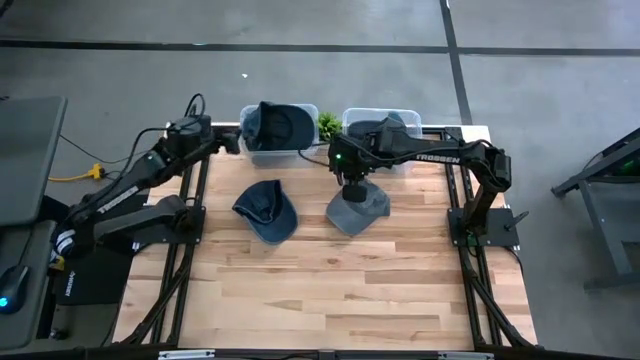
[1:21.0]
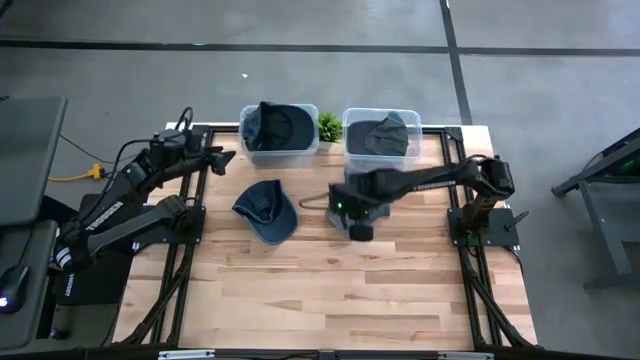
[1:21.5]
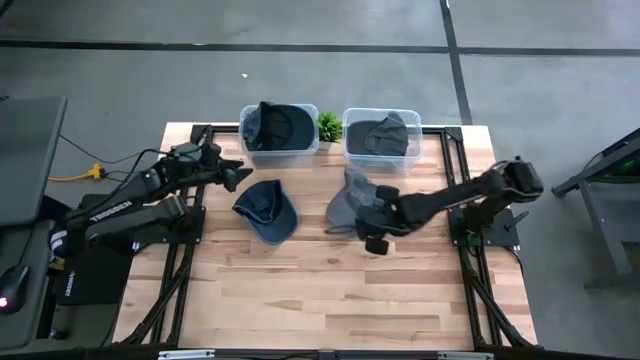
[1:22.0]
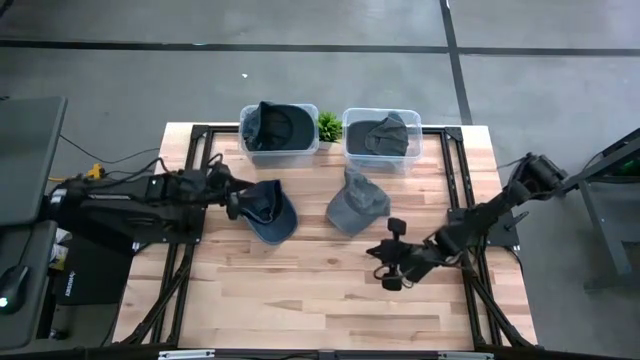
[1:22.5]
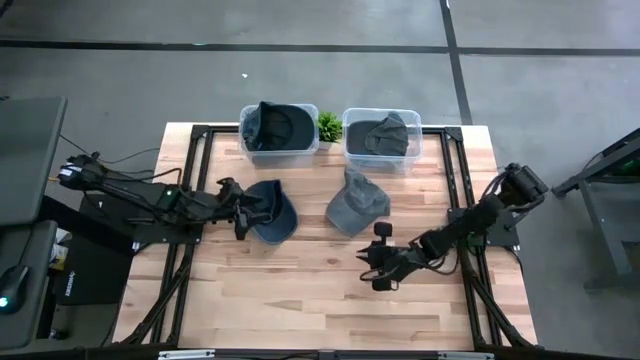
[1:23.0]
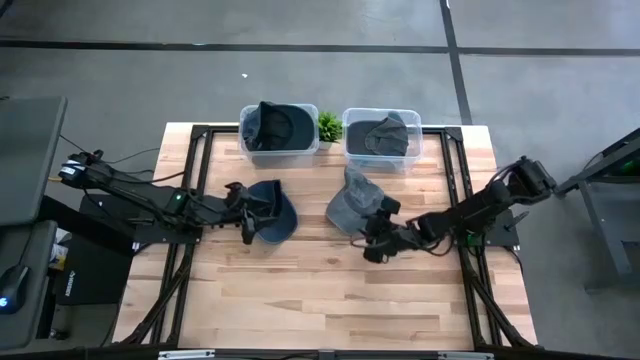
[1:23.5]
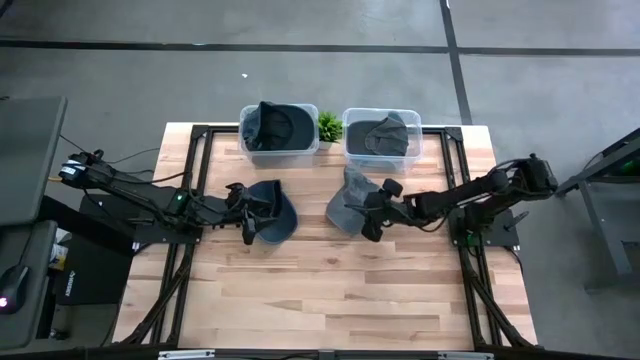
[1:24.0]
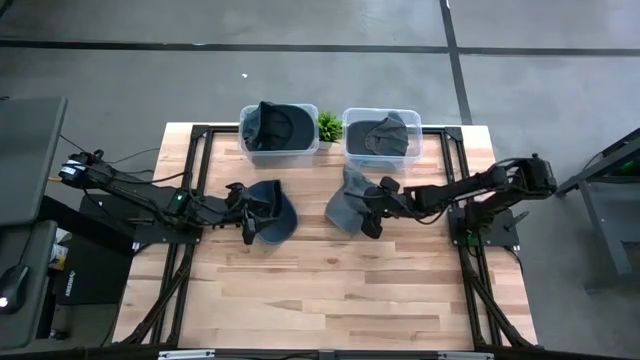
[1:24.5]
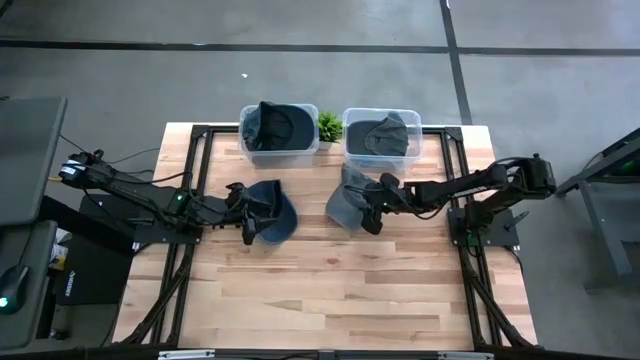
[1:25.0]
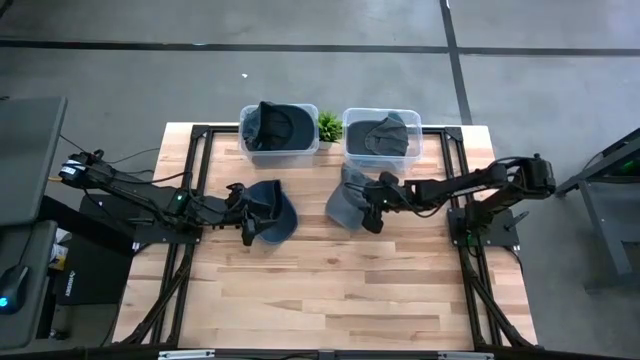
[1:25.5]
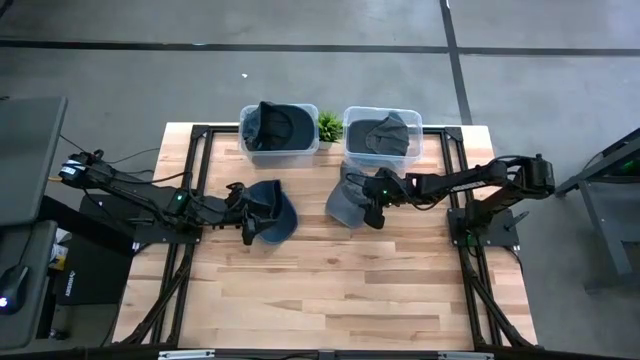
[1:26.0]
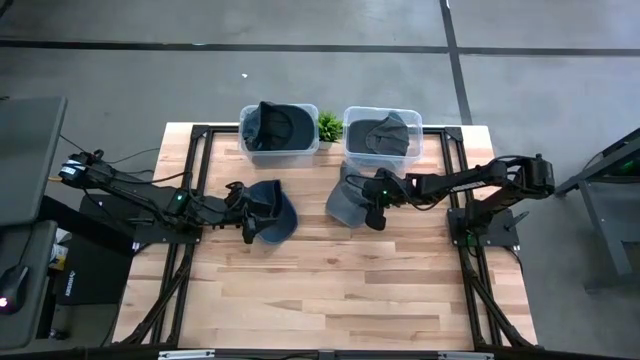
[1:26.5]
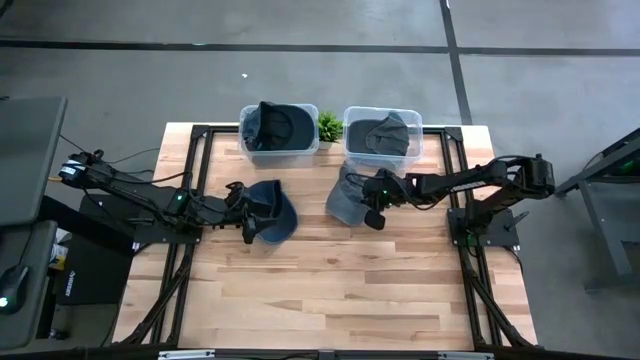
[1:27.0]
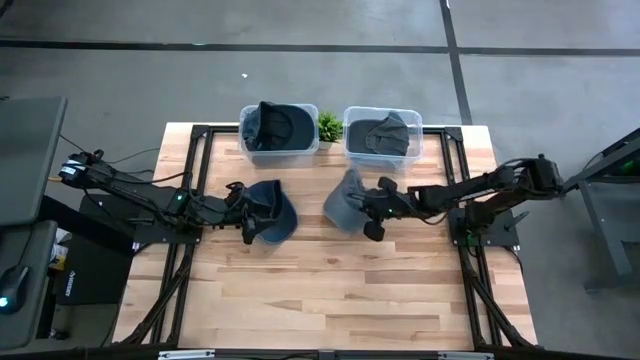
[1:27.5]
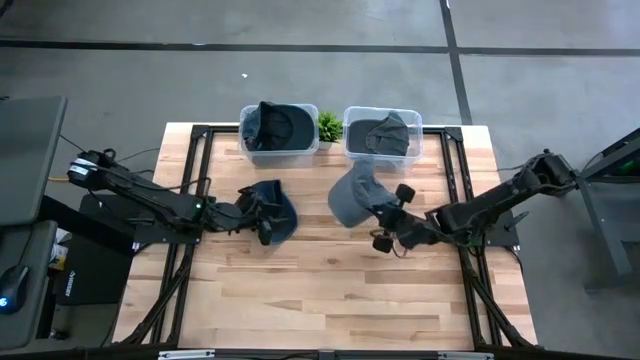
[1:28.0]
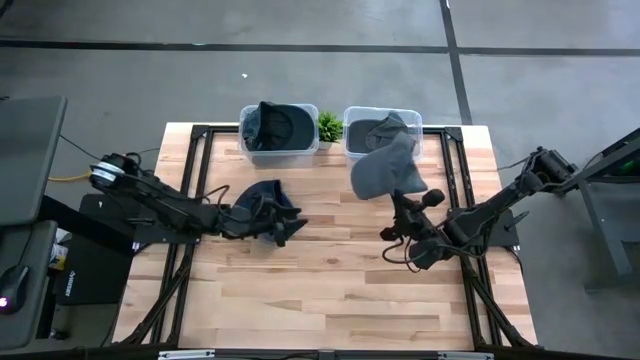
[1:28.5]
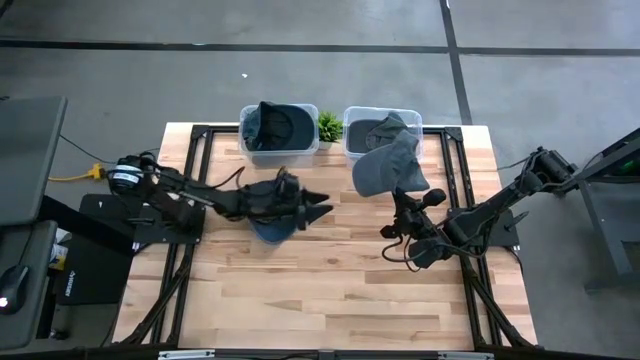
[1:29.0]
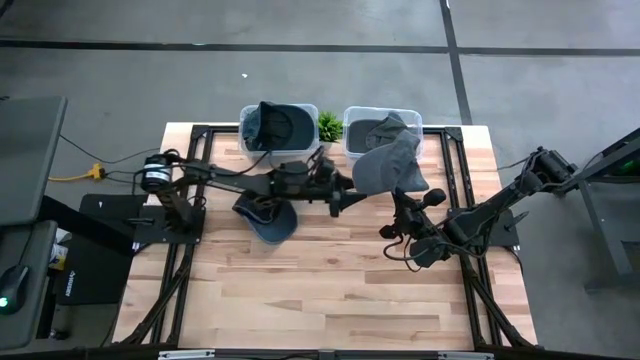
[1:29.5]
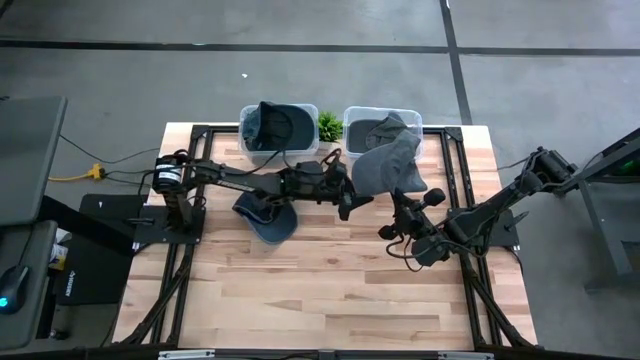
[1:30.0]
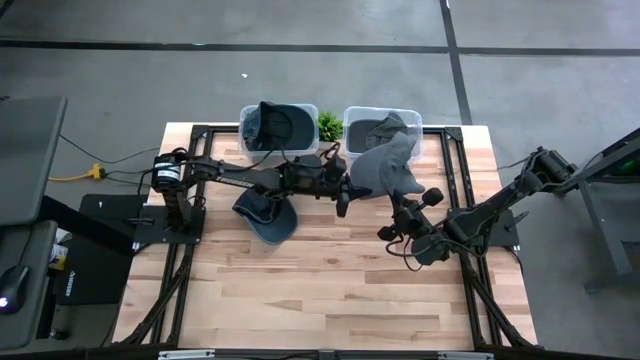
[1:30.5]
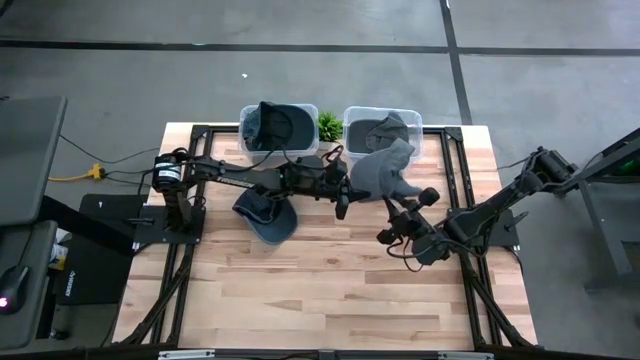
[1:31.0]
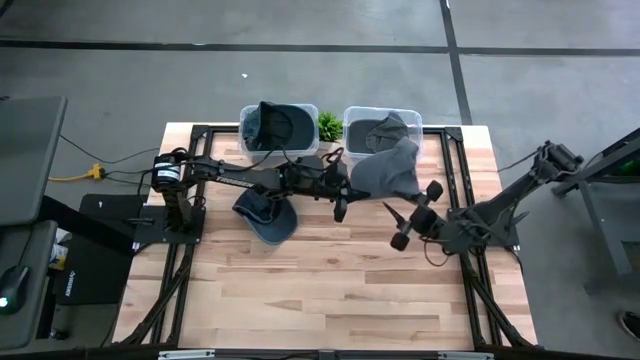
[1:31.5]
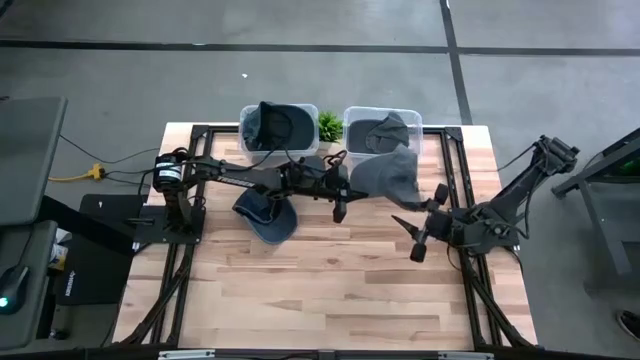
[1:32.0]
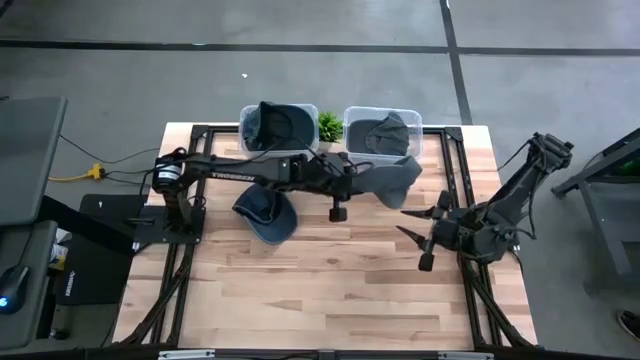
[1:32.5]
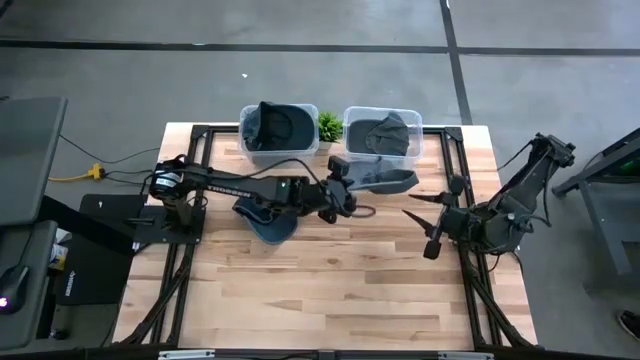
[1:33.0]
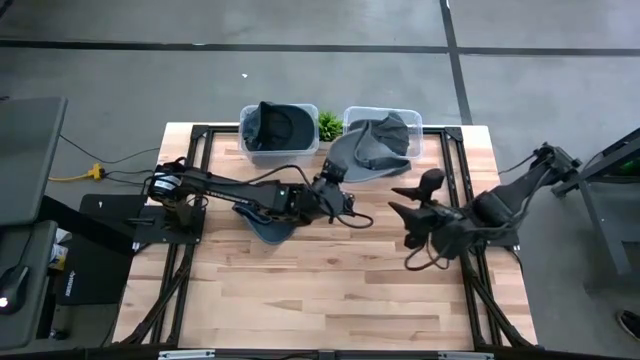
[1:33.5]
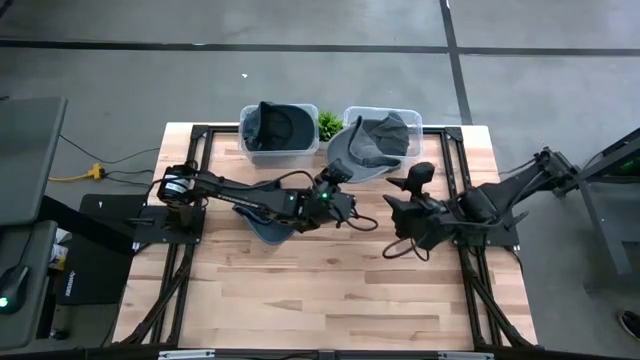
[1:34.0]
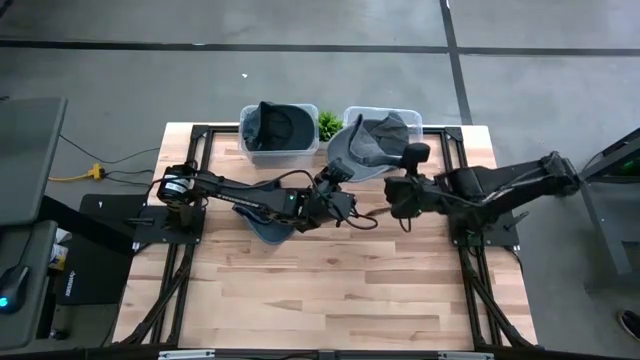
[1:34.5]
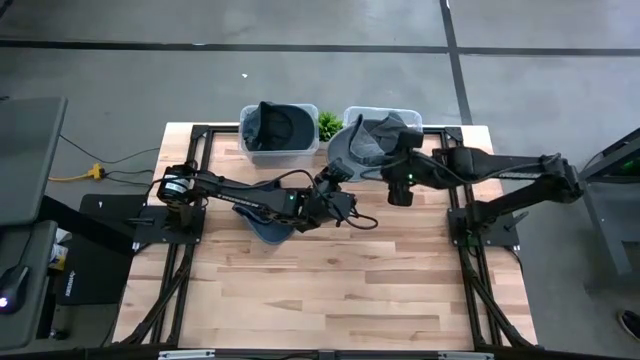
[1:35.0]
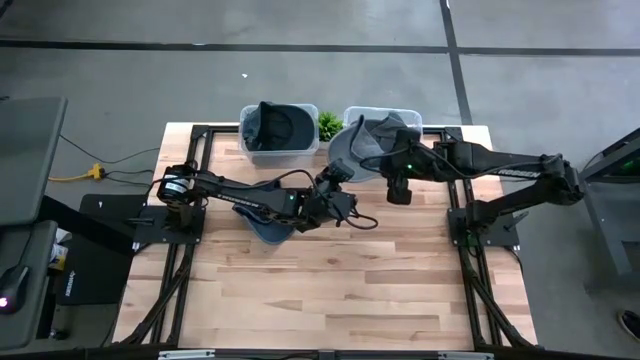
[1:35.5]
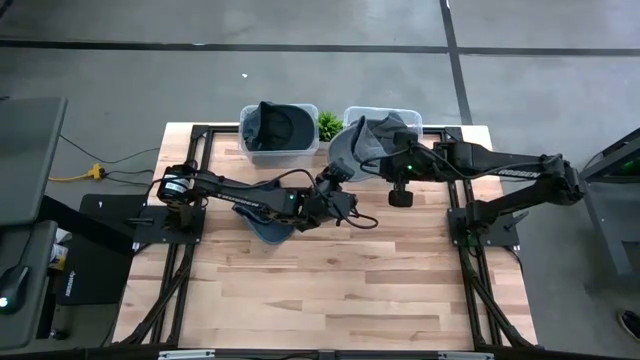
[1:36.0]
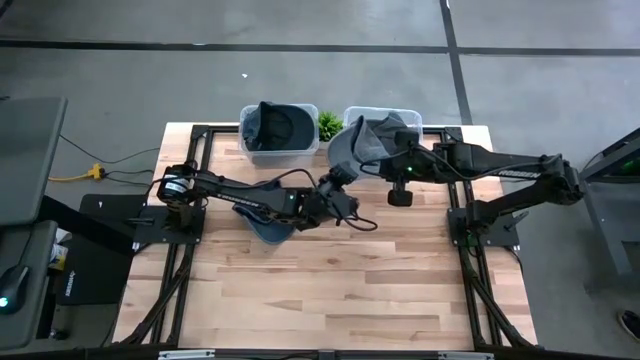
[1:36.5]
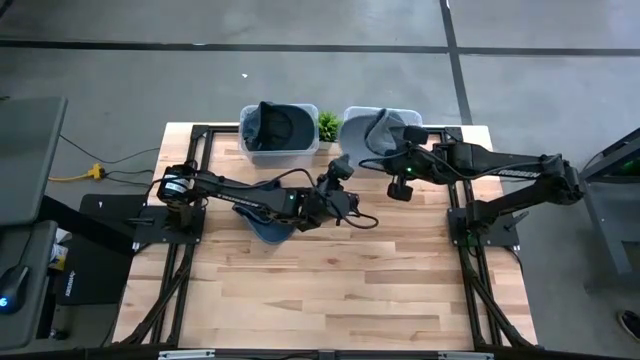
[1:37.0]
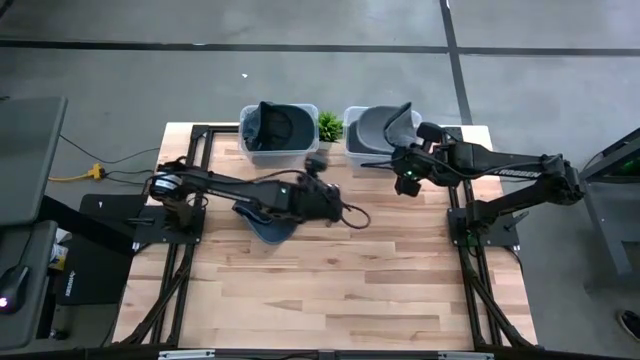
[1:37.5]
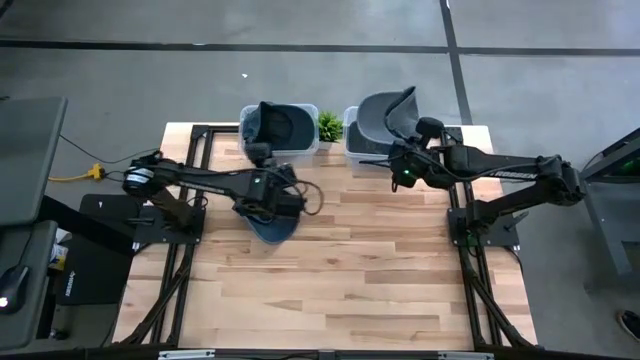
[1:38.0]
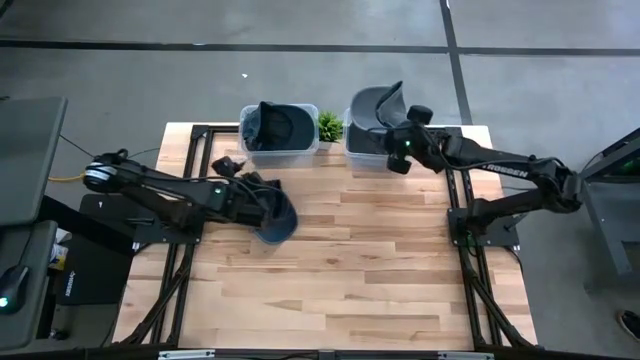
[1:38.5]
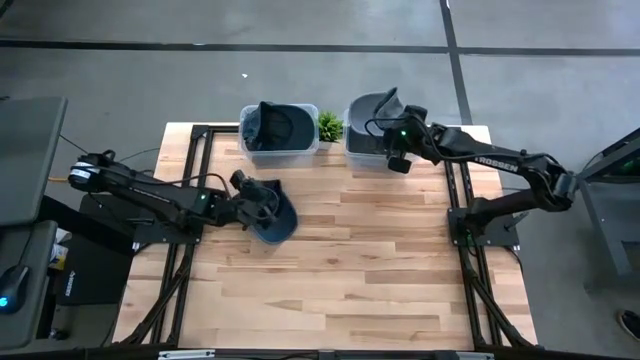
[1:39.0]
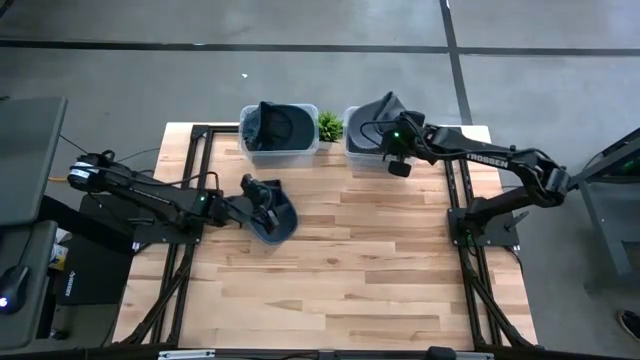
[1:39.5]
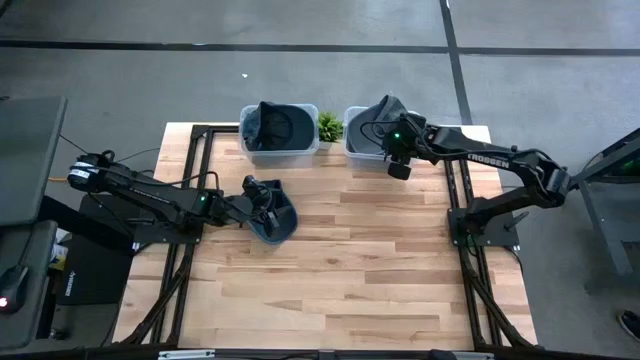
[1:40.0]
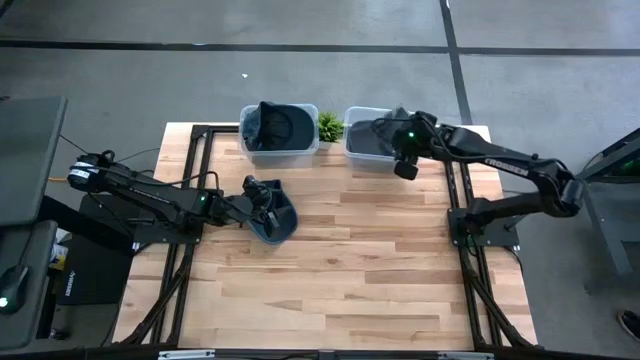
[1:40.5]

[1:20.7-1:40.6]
Task: Pick & Place hat
Put the gray cap into the right transparent bin
